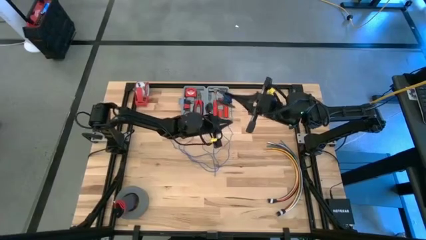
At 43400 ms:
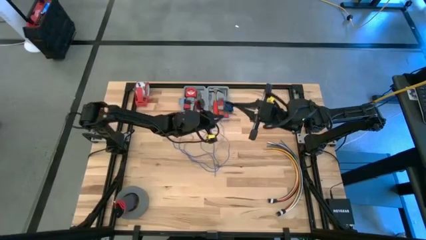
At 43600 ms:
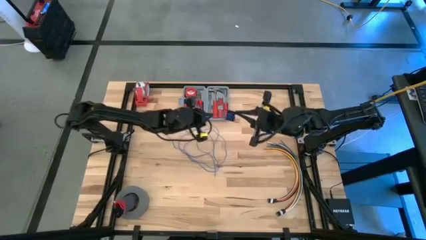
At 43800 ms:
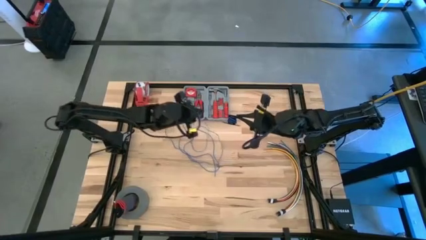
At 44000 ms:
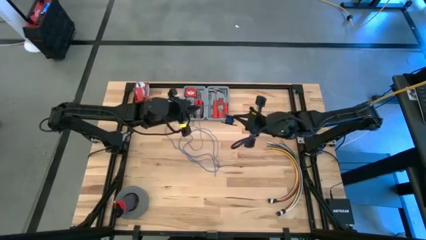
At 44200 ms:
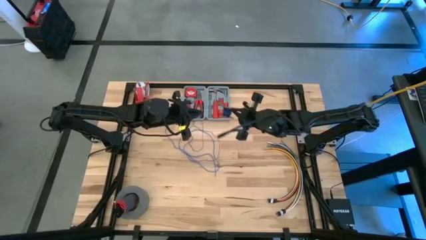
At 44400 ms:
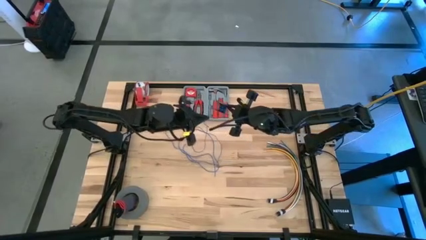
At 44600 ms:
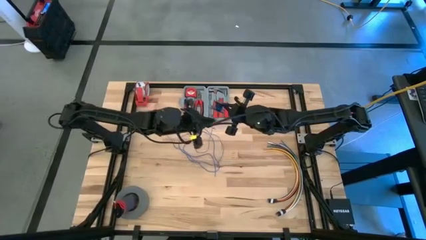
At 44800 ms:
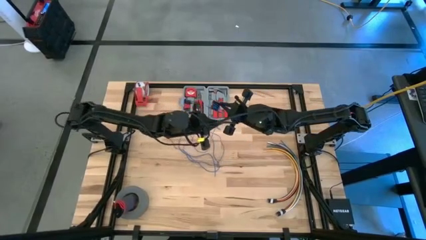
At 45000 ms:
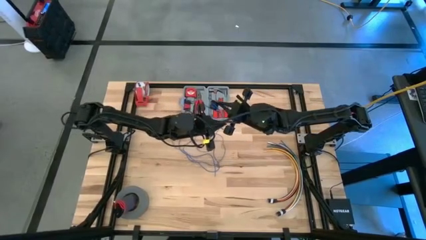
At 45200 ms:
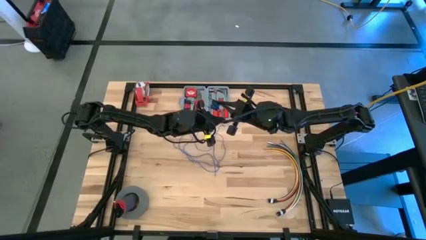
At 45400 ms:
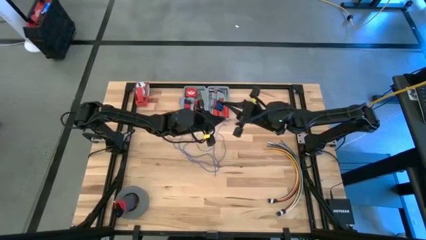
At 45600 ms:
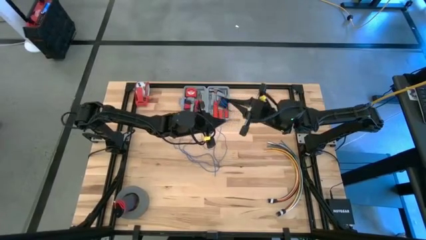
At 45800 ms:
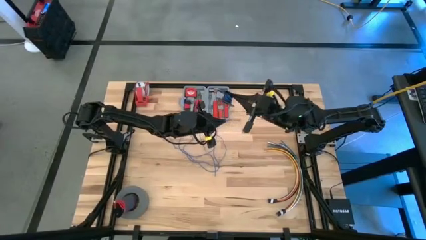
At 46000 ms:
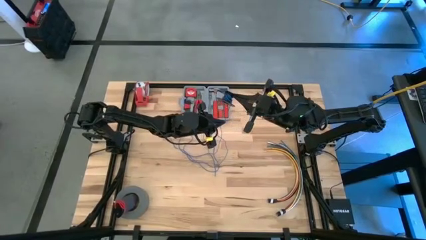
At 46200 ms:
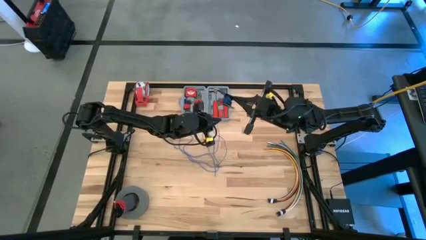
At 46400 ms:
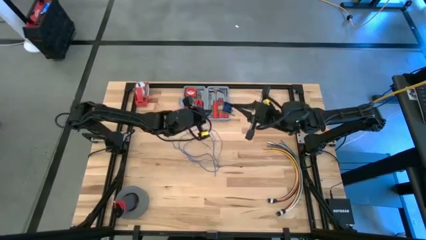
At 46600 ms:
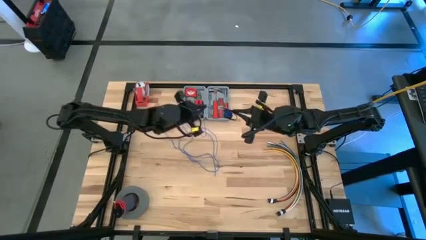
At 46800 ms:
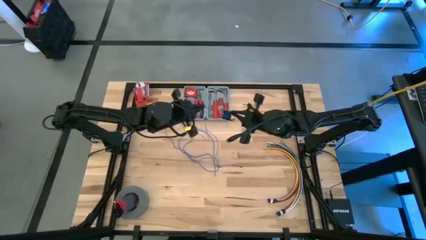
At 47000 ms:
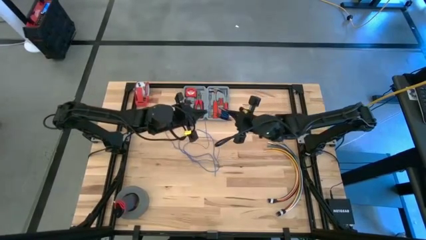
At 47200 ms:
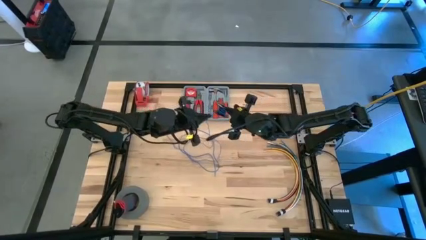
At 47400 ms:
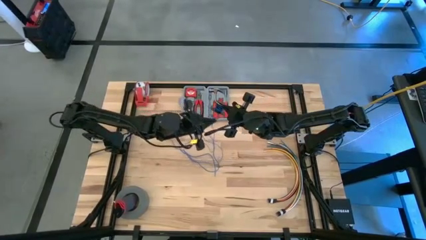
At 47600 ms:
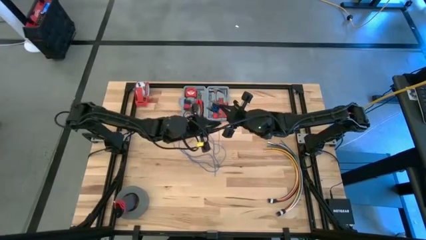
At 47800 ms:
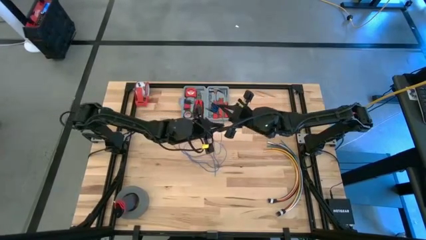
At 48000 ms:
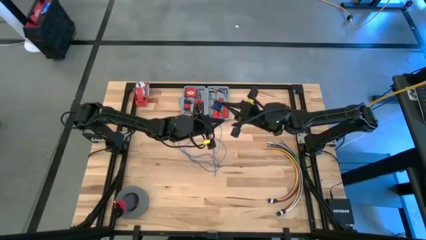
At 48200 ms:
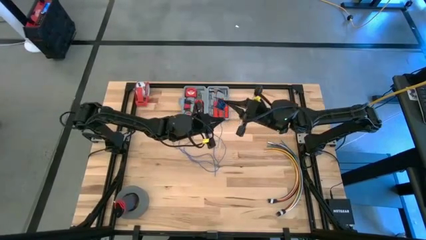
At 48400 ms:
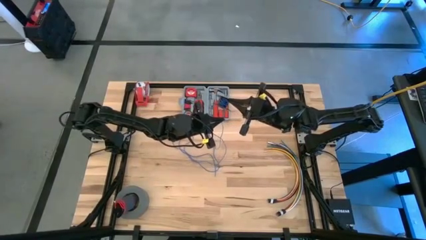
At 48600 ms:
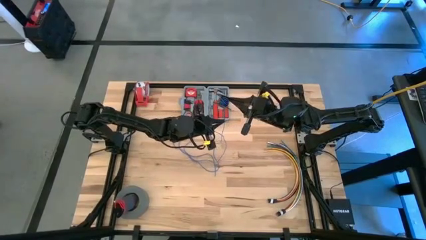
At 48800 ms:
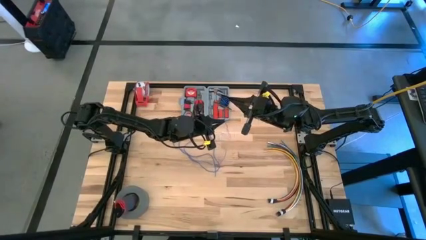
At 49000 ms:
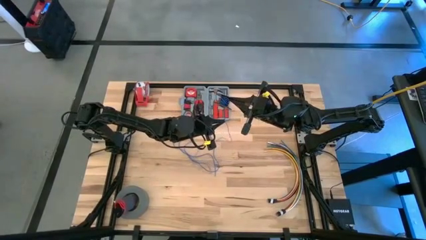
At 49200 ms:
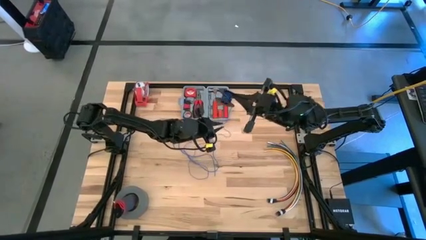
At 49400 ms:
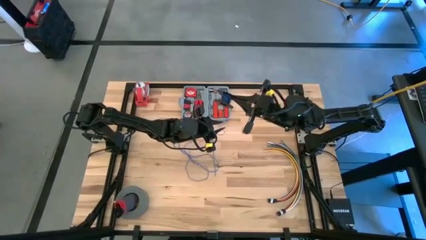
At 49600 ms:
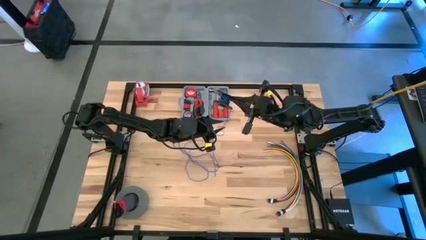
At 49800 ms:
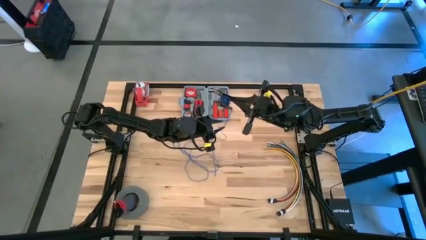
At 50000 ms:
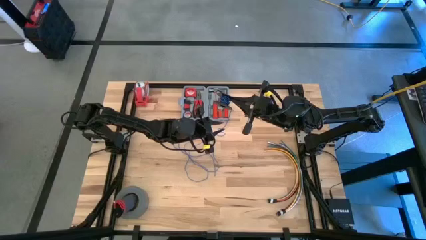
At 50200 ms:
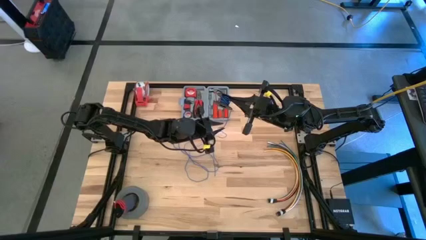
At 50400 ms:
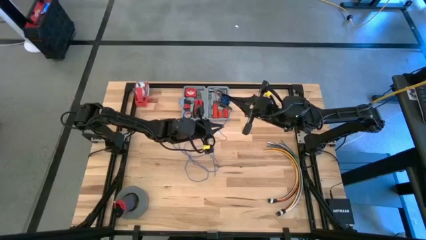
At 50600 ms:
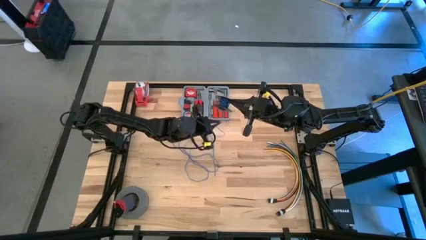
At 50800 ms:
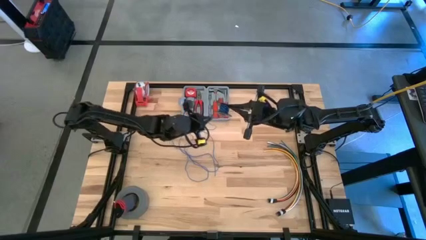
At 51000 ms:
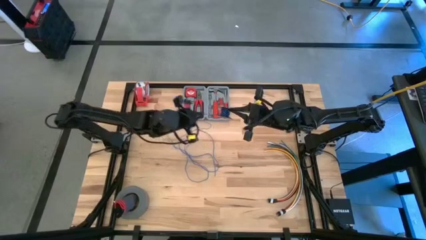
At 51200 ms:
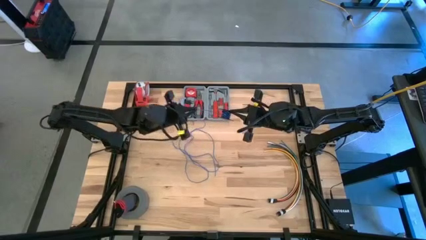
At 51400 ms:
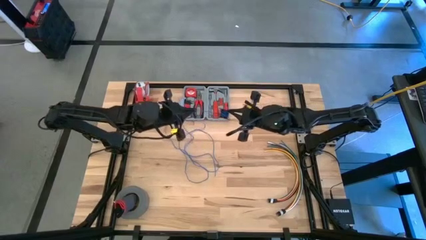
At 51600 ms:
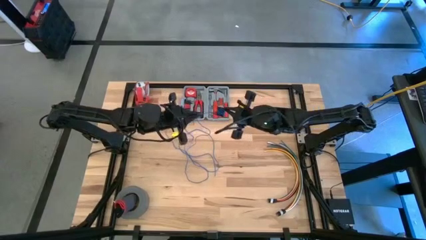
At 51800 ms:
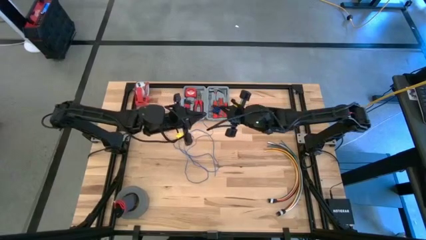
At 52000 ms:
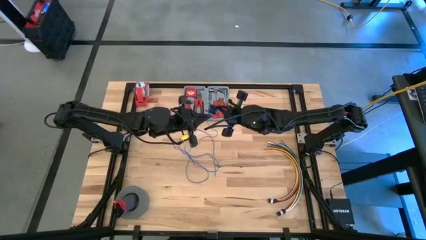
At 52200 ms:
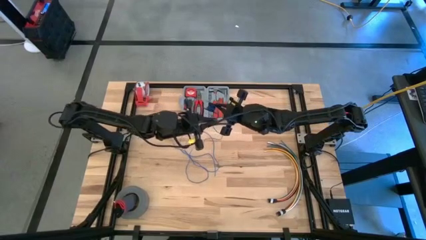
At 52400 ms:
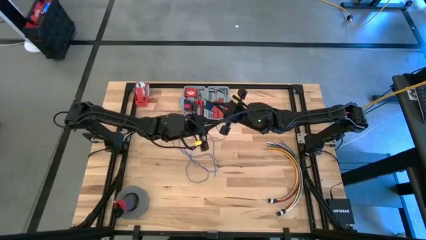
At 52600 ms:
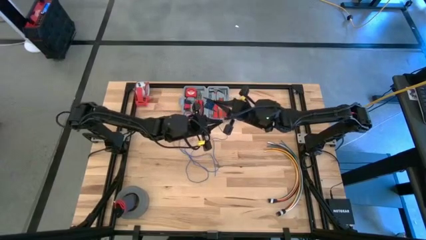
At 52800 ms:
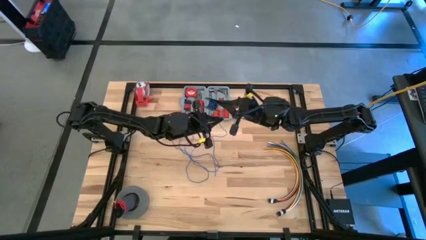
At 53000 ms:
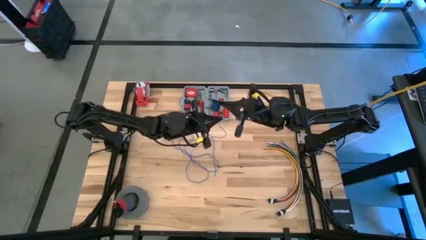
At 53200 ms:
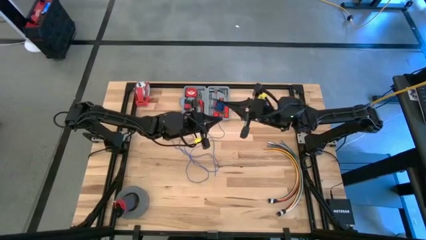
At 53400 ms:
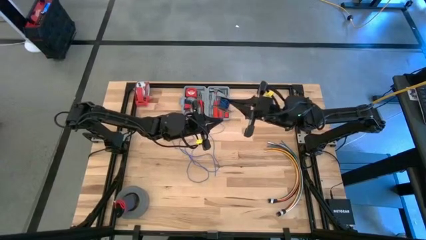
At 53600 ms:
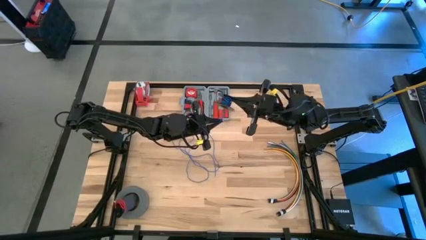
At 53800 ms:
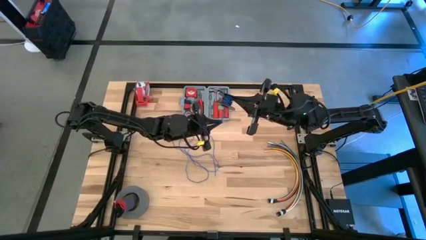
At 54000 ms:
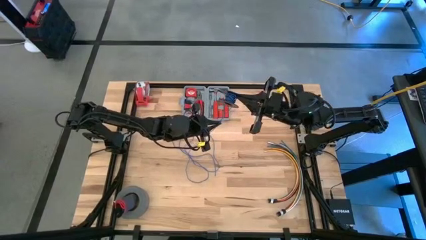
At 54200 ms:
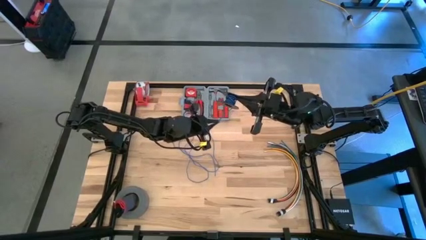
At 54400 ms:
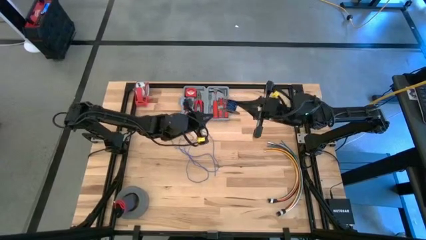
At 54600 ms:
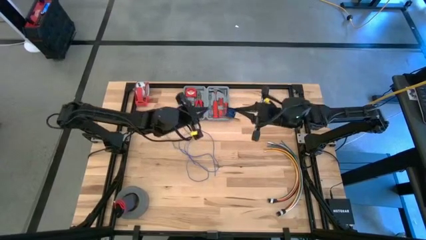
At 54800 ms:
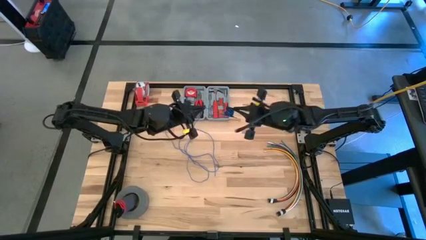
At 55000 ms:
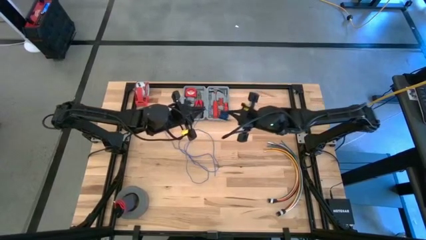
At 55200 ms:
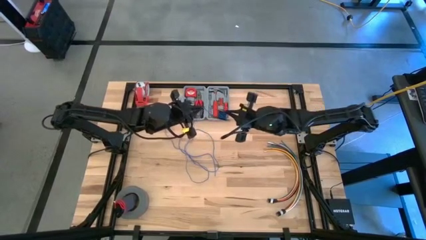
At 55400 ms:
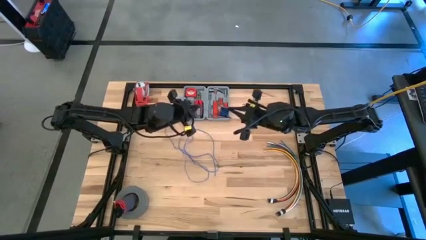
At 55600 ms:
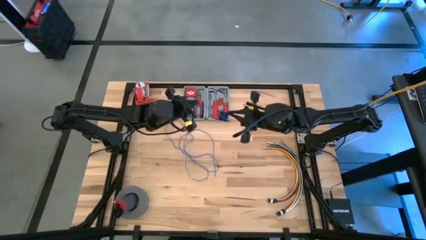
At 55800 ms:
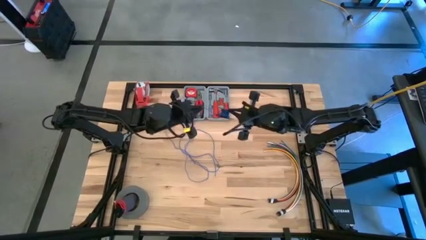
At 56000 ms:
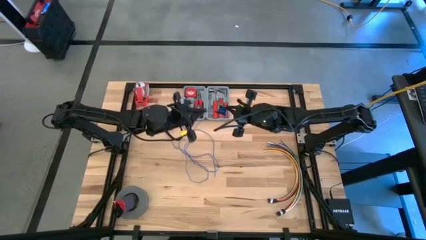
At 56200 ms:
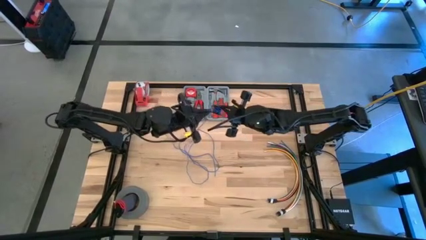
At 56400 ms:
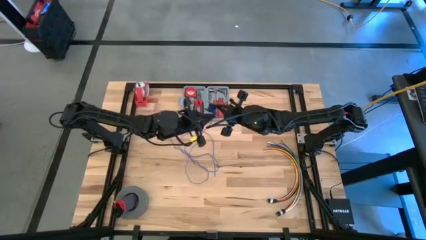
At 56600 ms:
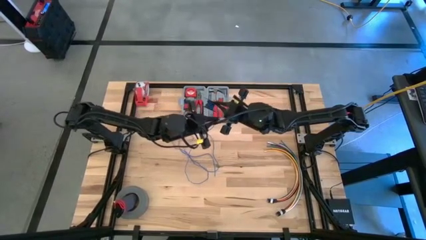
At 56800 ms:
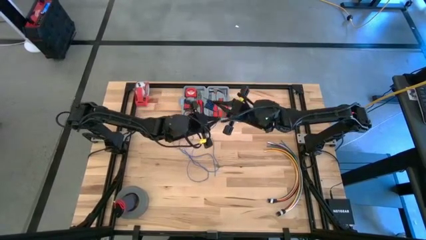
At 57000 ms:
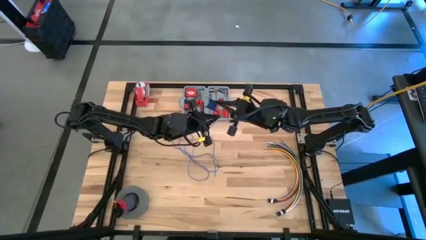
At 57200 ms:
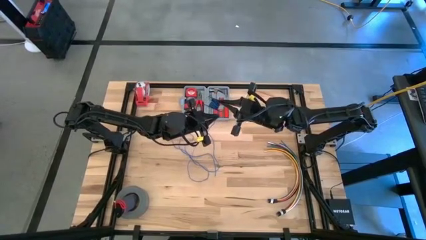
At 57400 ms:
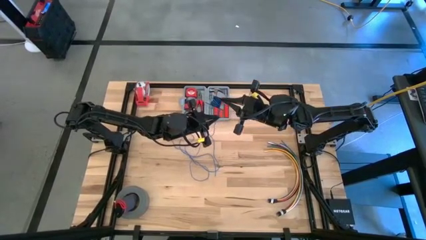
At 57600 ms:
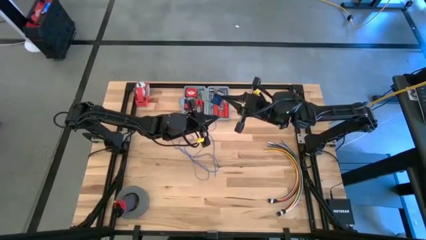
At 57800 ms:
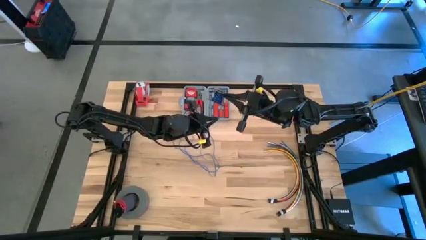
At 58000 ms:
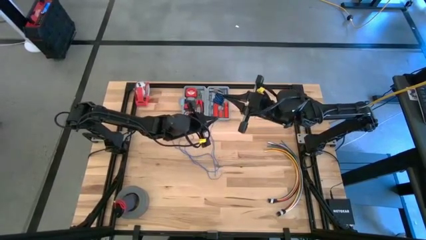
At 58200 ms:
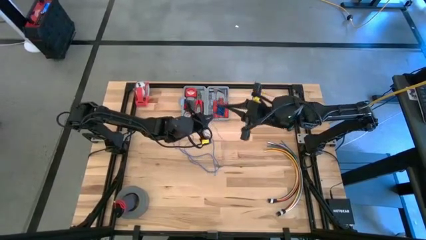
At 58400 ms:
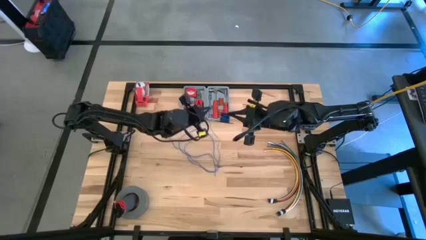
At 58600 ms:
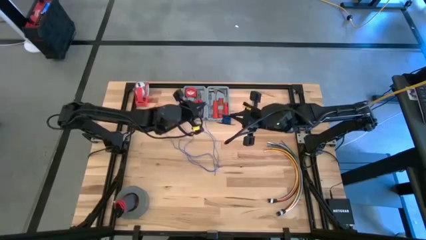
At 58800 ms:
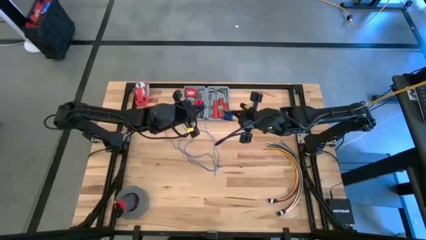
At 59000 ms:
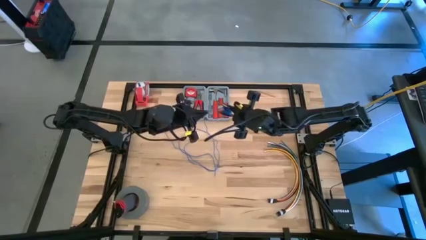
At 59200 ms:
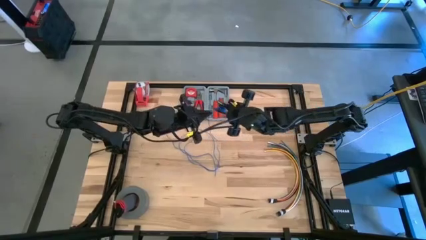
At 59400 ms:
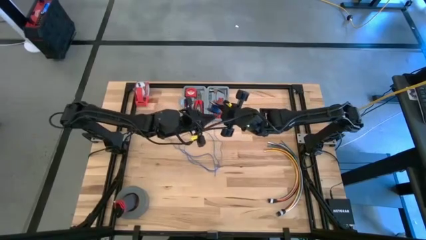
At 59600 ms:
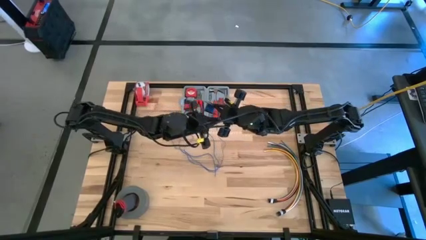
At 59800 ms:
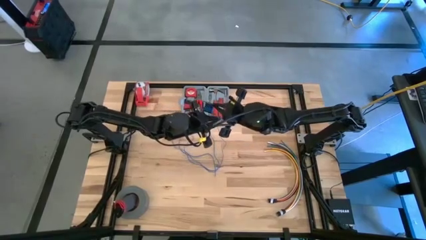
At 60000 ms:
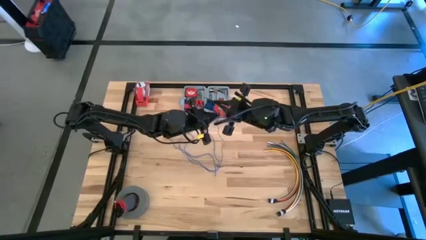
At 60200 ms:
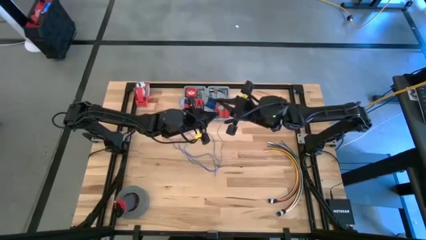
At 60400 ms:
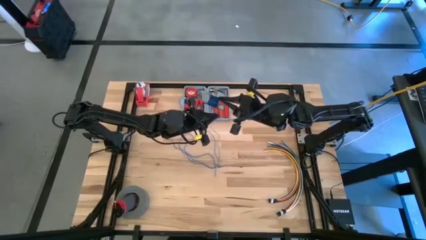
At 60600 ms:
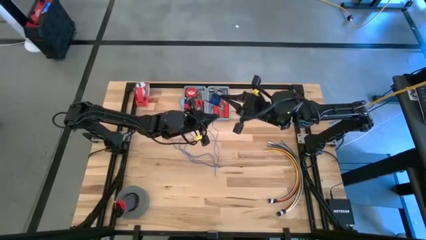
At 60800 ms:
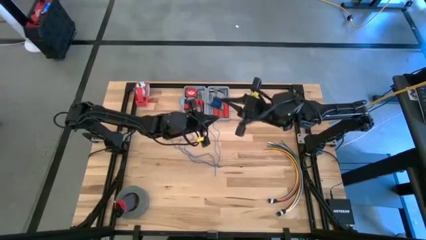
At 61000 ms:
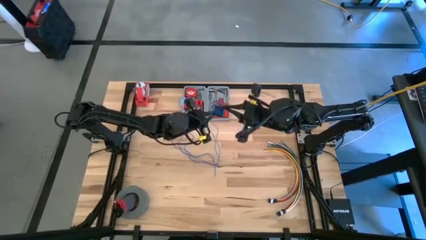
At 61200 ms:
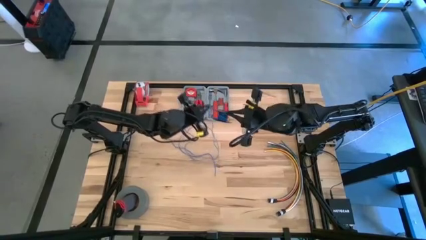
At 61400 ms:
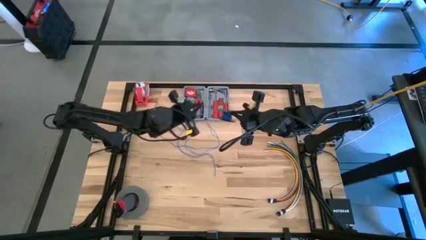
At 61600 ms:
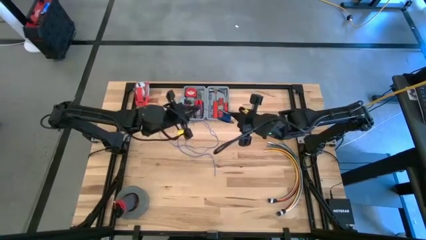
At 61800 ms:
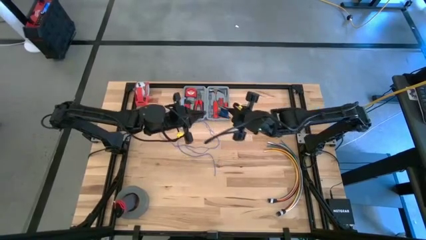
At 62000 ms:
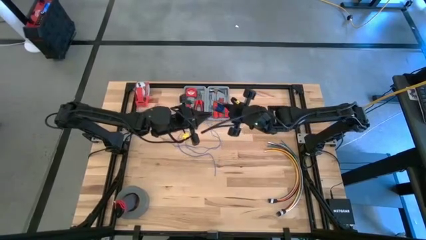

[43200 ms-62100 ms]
Task: Coil cords
Coil the blue wire into the black spool
